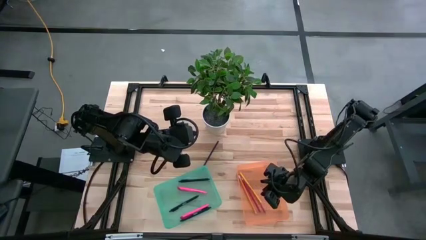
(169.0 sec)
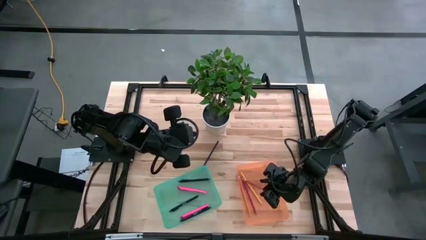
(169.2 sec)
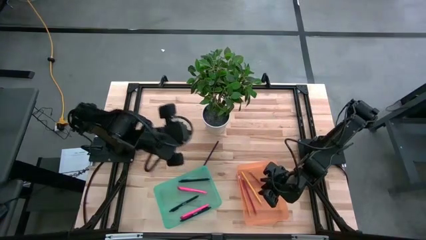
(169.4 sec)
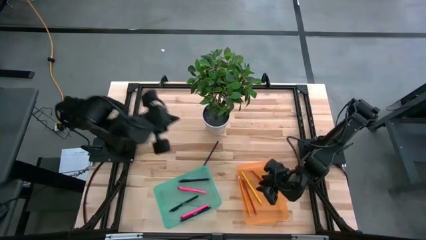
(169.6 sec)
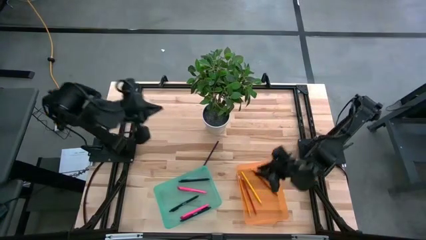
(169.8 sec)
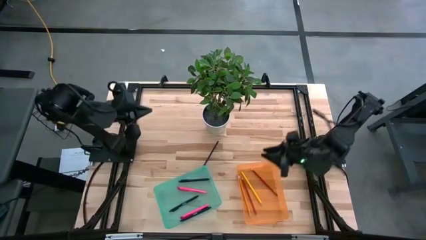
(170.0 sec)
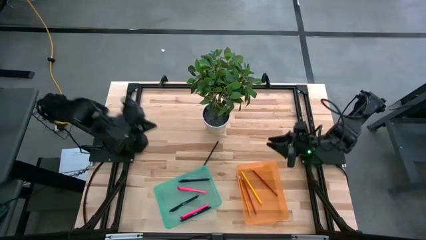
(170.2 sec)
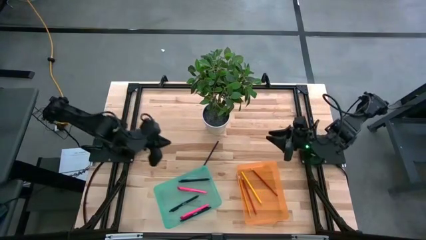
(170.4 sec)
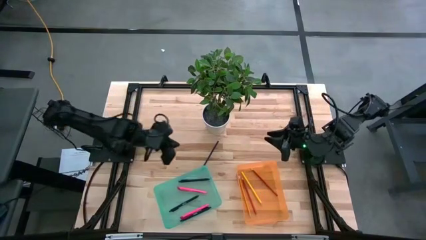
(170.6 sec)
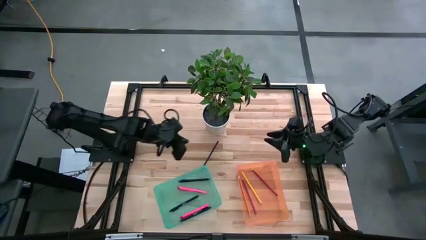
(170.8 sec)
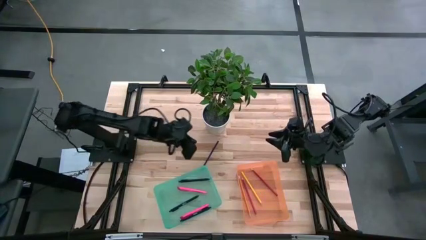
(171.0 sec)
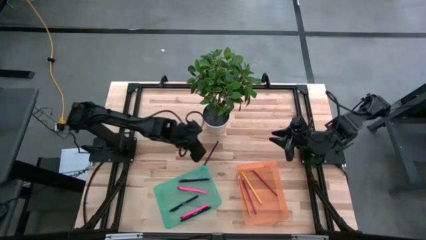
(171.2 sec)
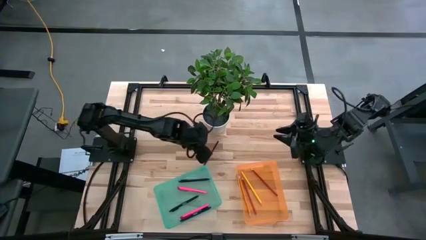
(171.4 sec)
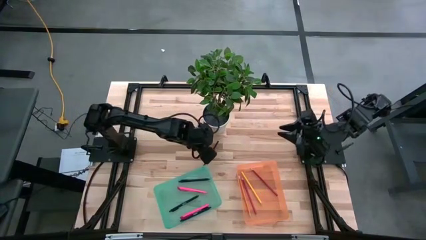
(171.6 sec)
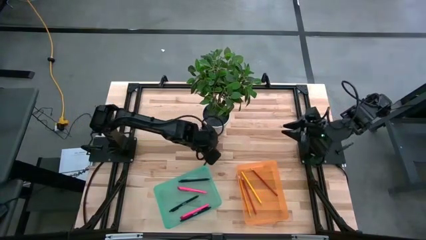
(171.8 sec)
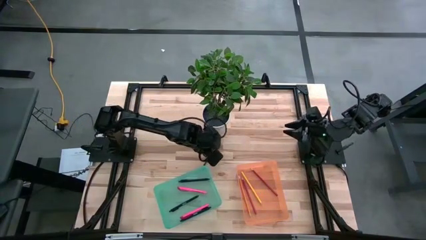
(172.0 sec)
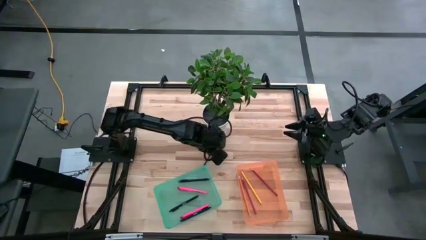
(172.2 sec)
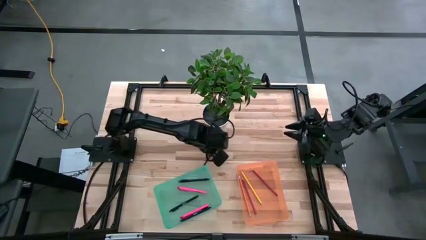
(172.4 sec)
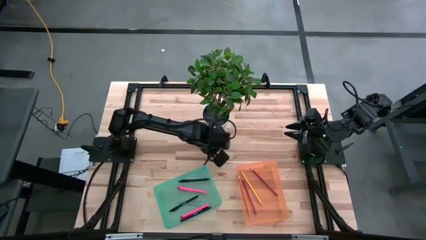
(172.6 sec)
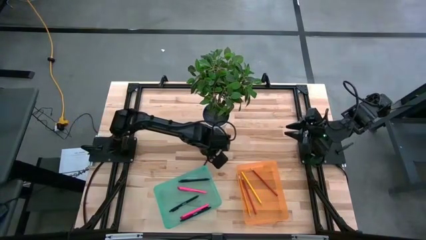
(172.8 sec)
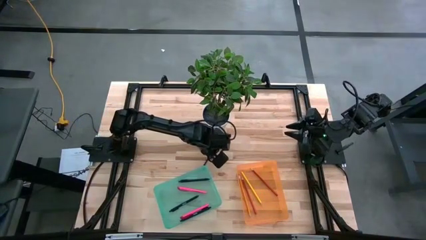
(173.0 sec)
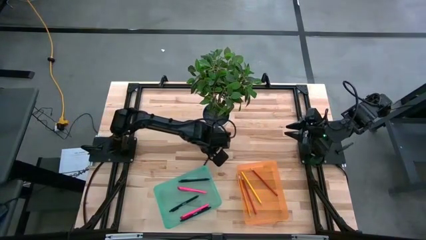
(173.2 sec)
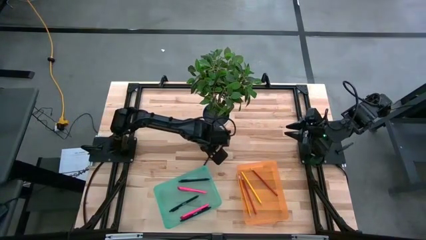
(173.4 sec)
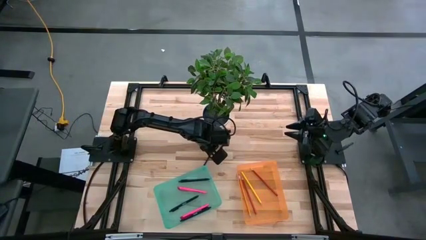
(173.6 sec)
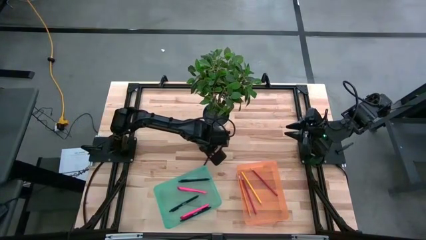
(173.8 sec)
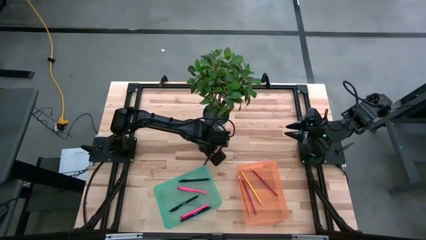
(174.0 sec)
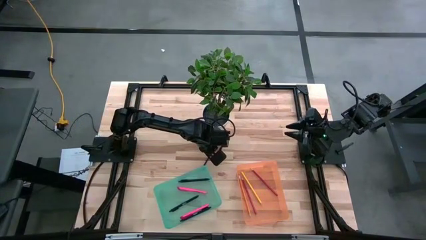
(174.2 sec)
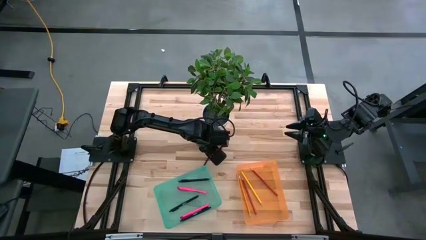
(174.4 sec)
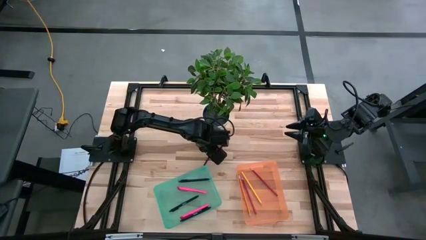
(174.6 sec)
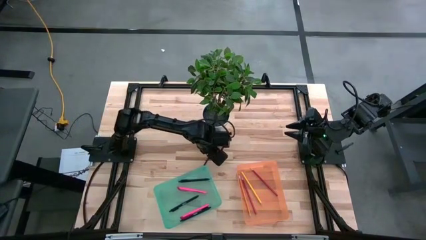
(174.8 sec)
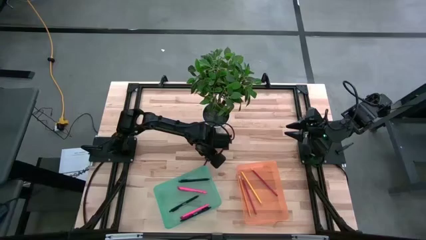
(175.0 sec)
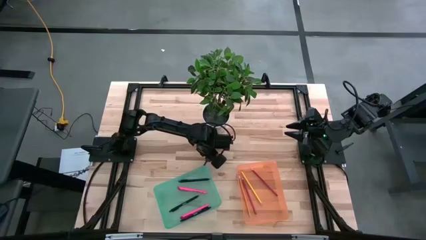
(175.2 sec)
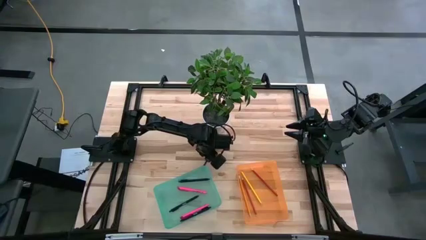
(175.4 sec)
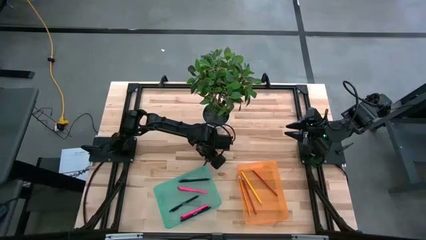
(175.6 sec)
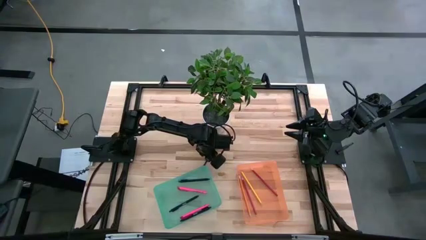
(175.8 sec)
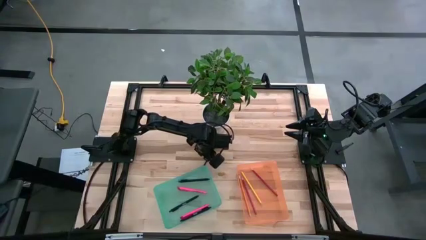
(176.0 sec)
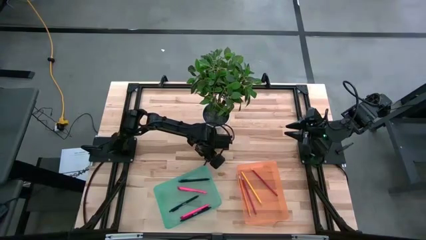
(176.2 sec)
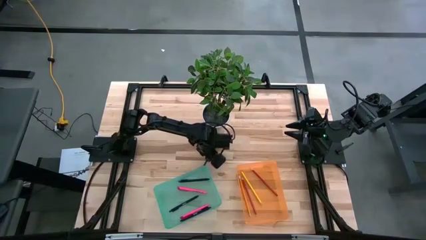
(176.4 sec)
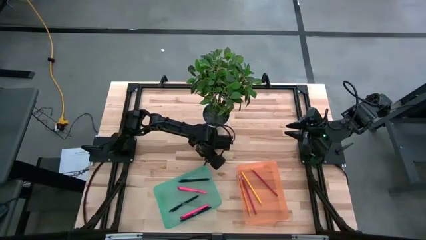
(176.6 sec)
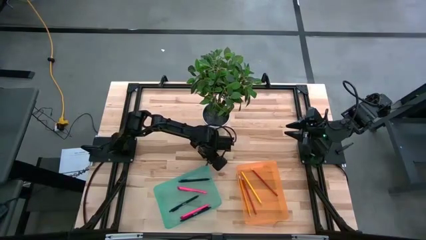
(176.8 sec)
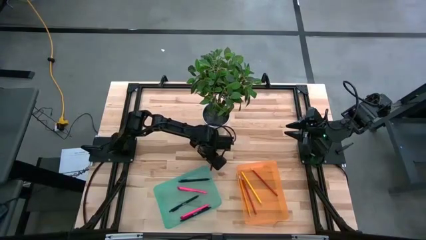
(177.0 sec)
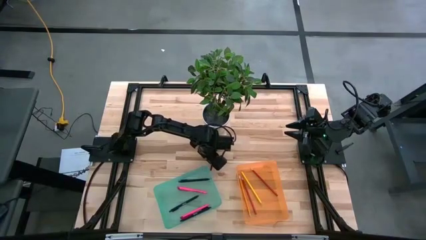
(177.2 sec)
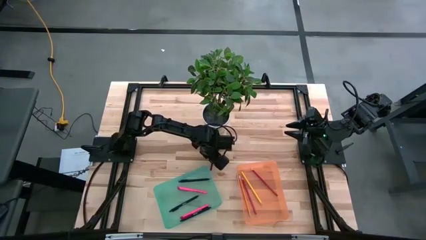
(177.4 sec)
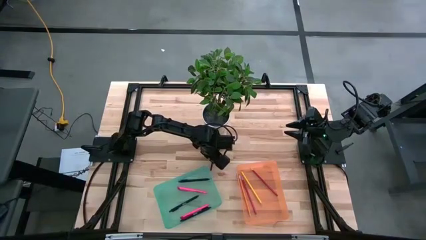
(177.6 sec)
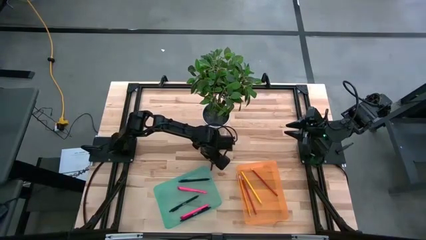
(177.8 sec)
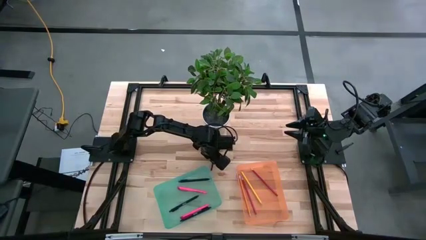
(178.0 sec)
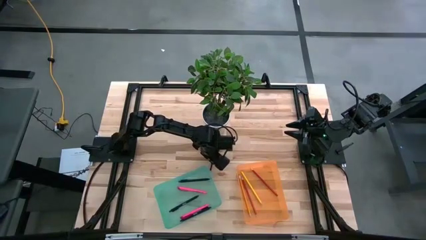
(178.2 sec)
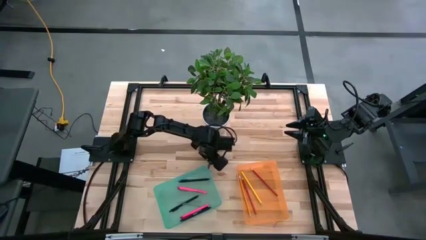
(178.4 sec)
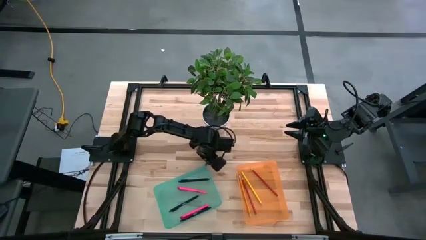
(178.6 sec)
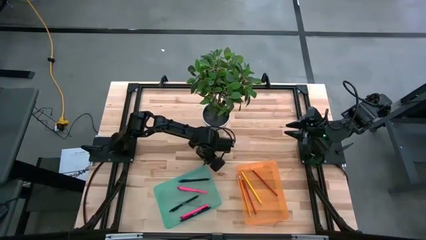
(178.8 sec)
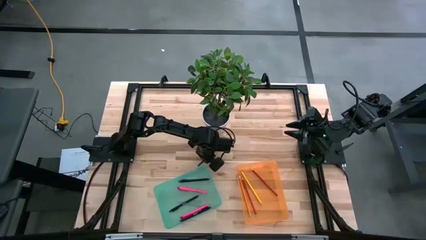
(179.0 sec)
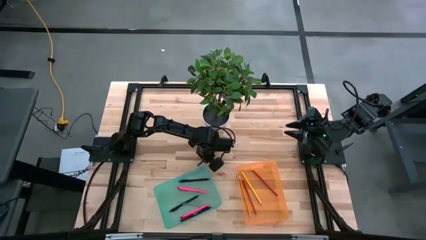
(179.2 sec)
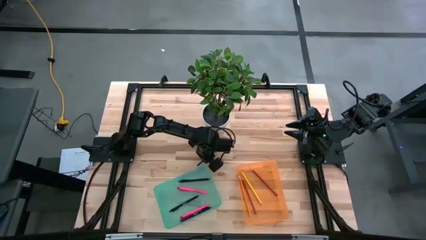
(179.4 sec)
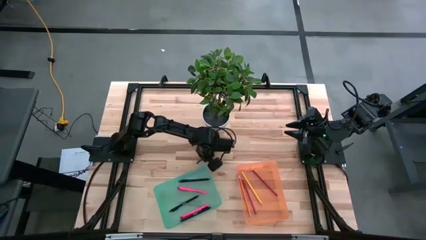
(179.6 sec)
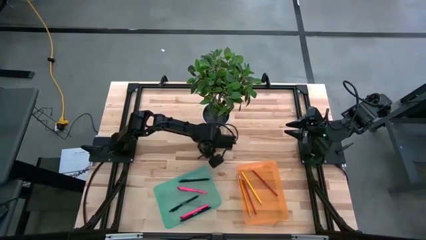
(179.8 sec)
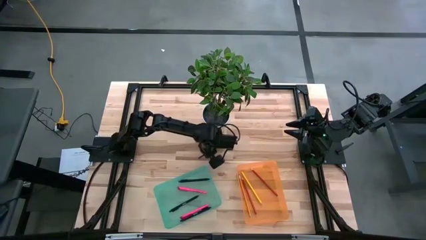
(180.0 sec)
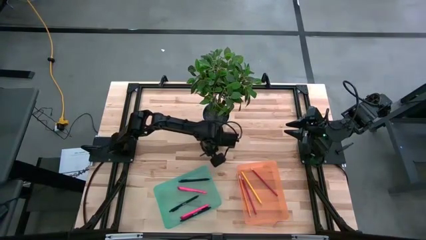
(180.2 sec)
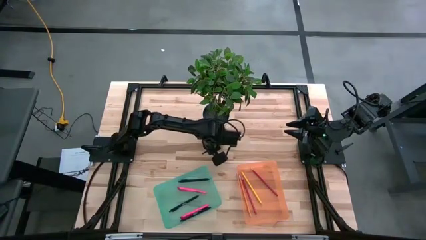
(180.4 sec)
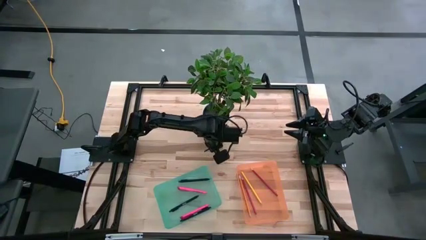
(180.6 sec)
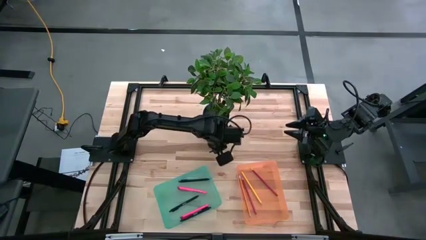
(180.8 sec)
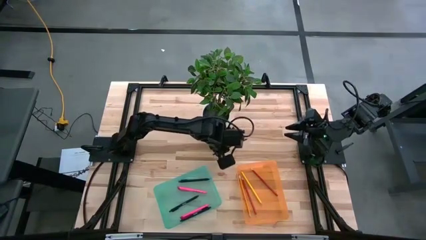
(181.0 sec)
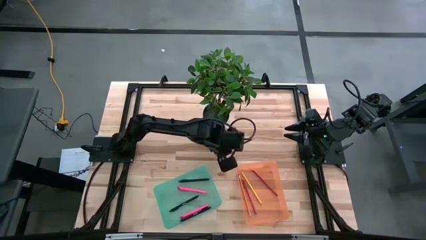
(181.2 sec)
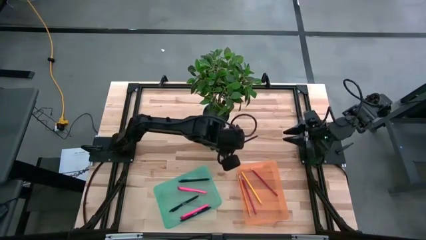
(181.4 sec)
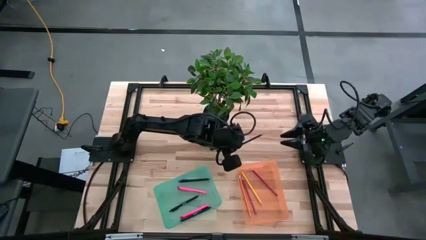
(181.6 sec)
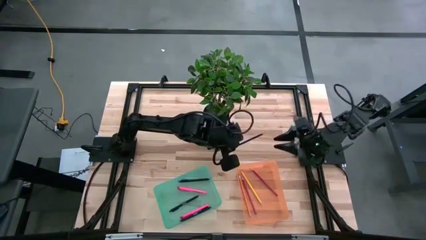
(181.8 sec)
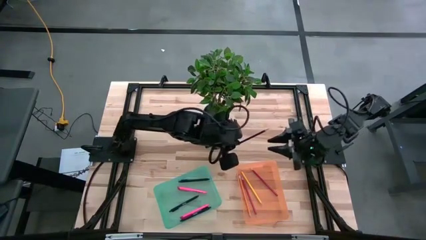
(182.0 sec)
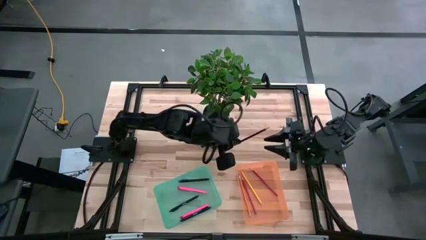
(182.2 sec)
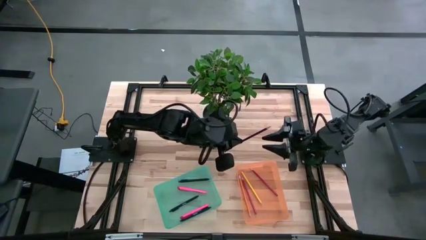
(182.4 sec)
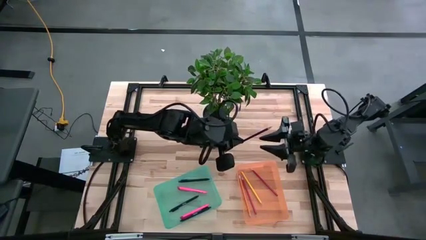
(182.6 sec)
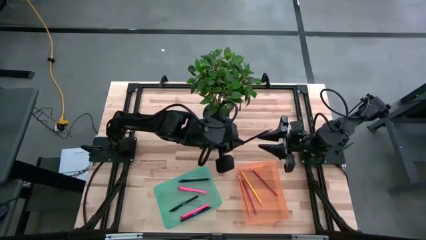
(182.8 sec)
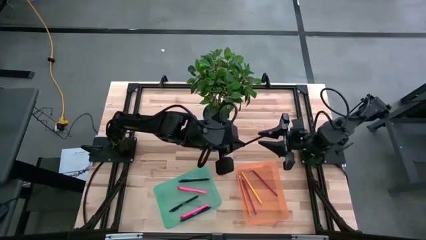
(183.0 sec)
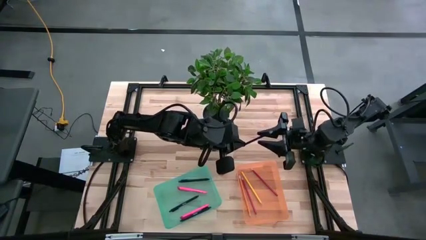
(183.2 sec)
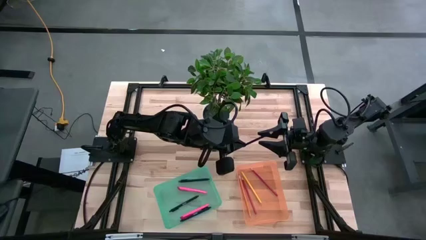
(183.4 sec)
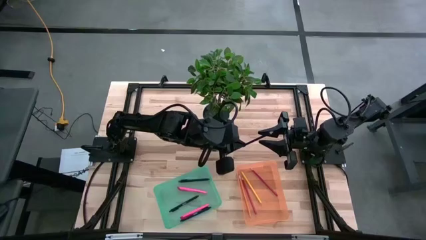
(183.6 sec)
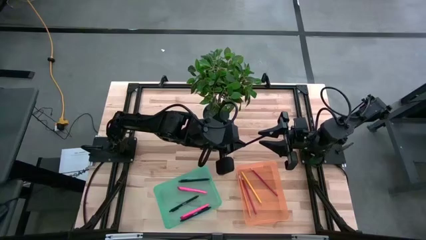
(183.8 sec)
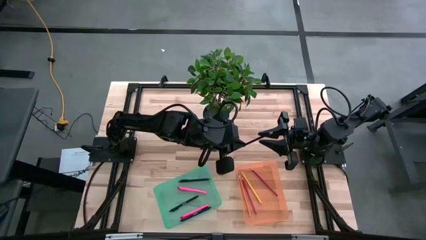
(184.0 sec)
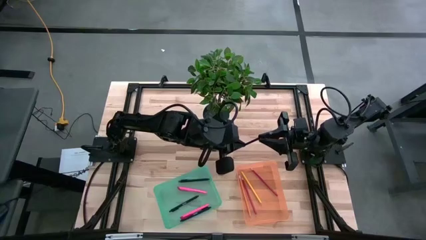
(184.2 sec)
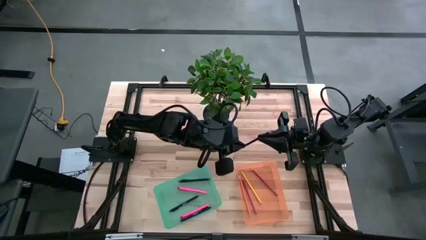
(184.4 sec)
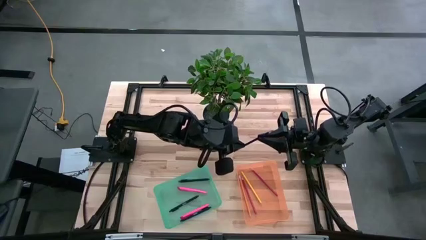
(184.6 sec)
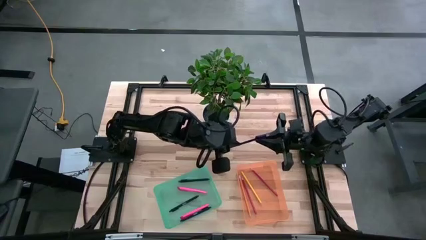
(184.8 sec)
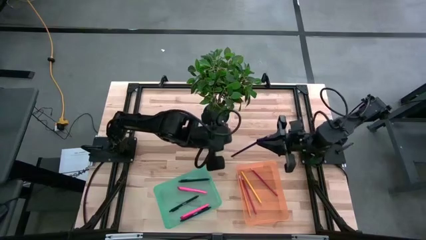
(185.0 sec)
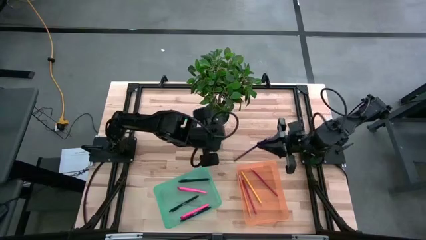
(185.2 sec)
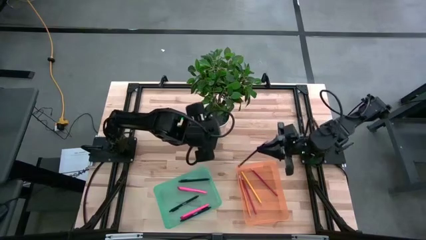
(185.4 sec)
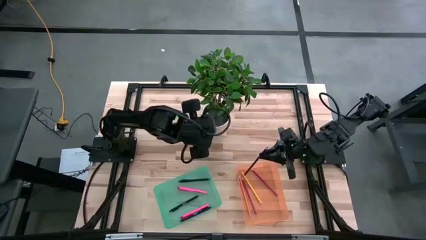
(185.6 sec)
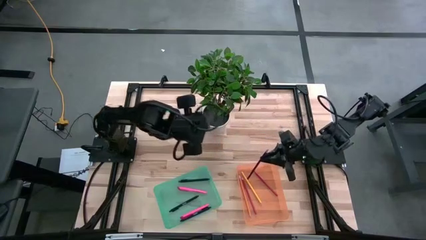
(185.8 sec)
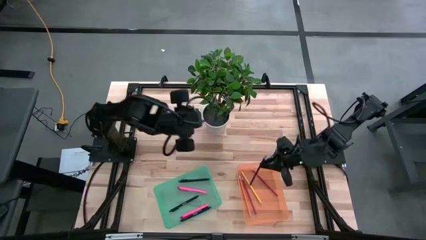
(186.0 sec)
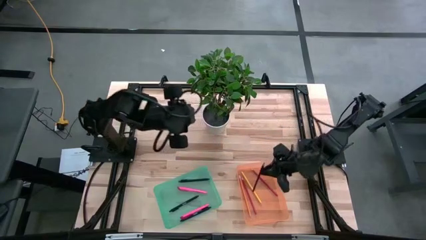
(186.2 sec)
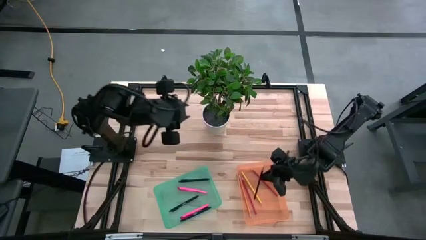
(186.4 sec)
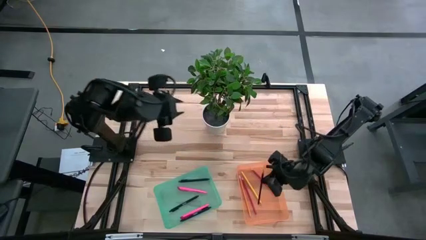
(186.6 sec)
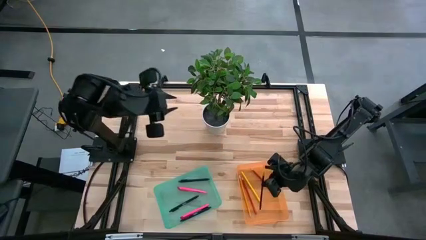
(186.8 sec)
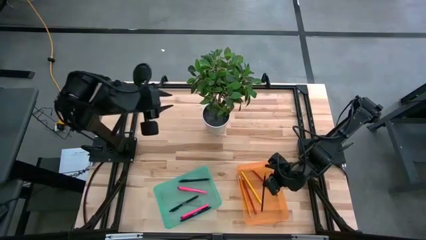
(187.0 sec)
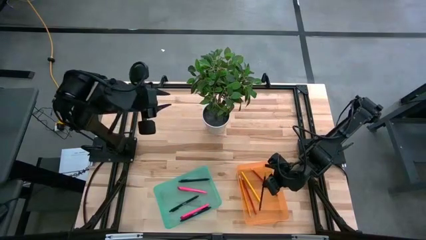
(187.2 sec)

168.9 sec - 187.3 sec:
Task: Sort pens & pencils
Put the purple pencil into the orange bin
